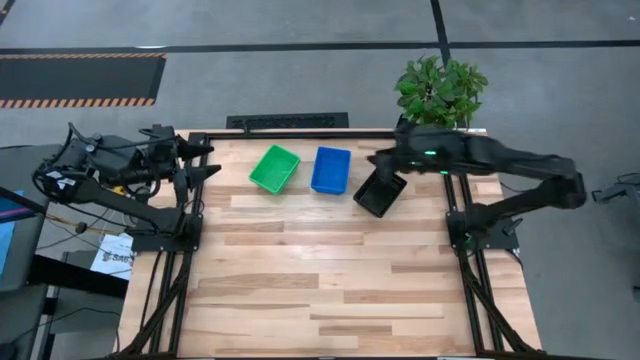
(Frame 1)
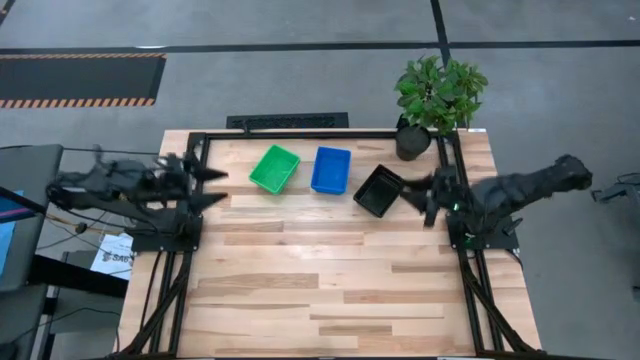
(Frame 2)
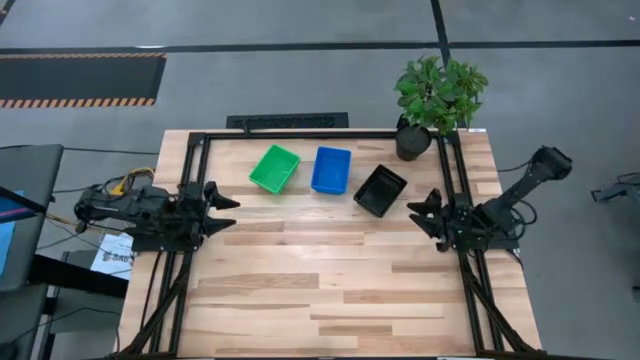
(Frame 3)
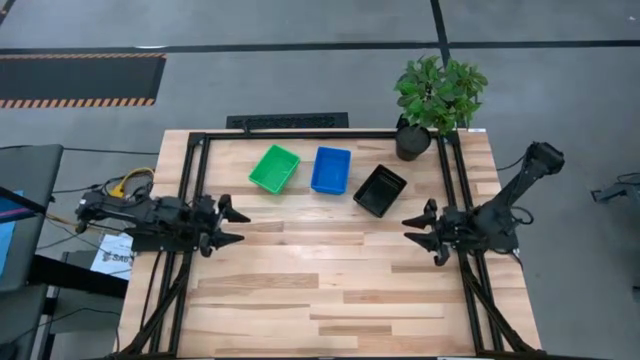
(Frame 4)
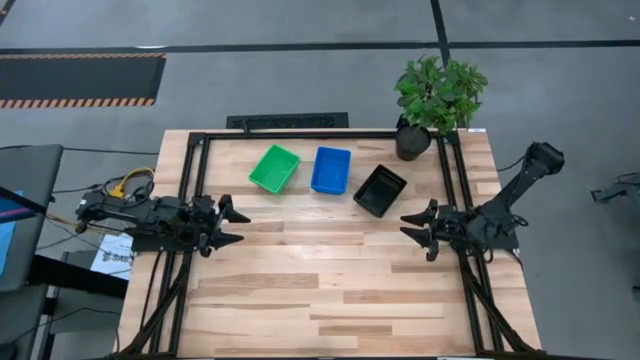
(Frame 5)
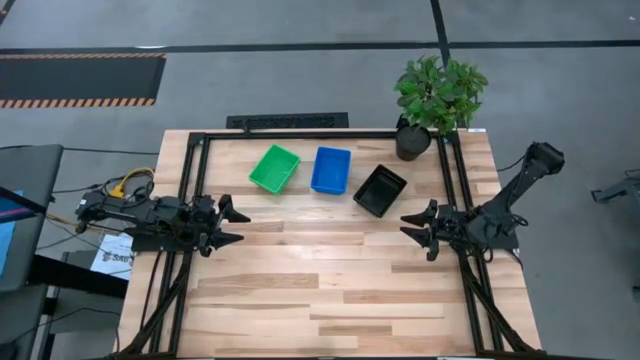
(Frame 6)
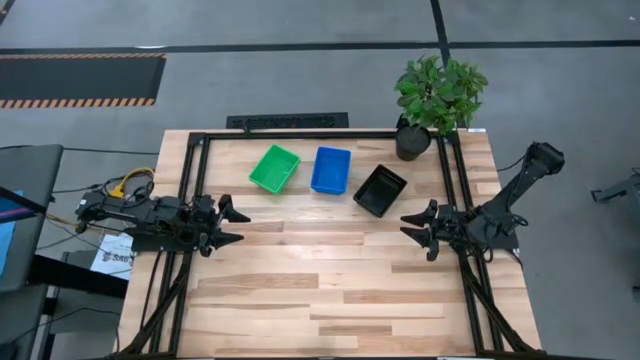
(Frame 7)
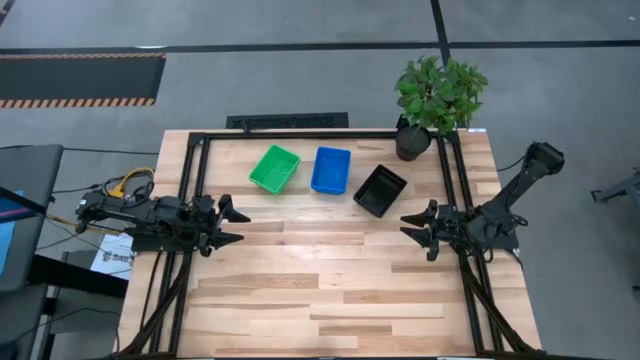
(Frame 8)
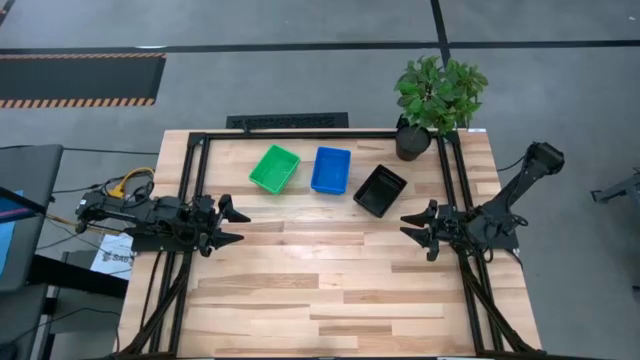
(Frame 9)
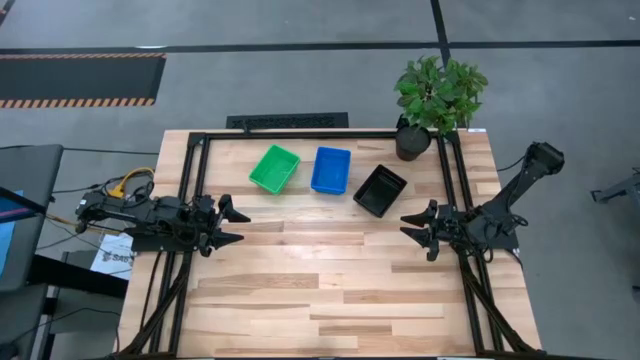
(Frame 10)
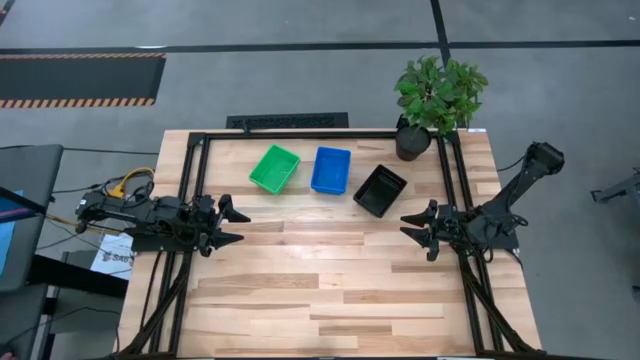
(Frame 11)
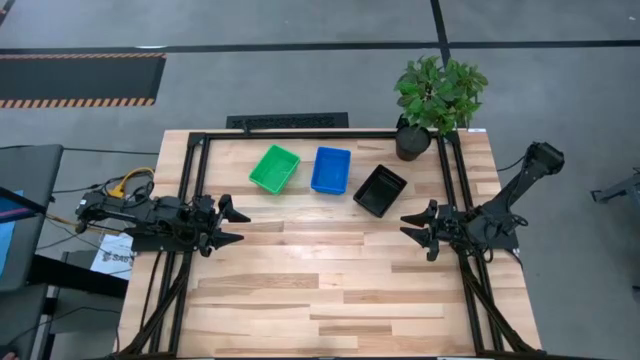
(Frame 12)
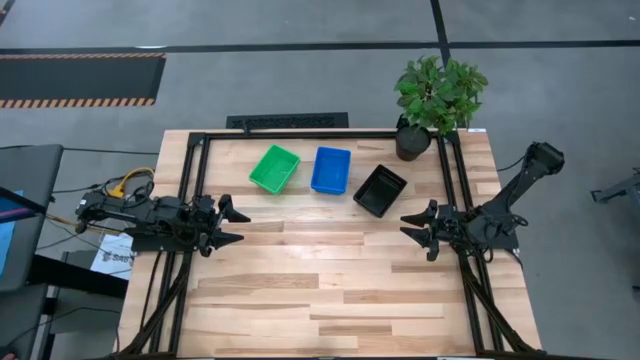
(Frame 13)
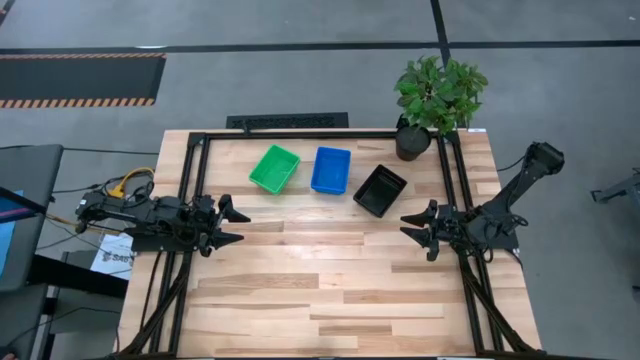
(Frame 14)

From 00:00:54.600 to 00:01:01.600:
Return to Home Position

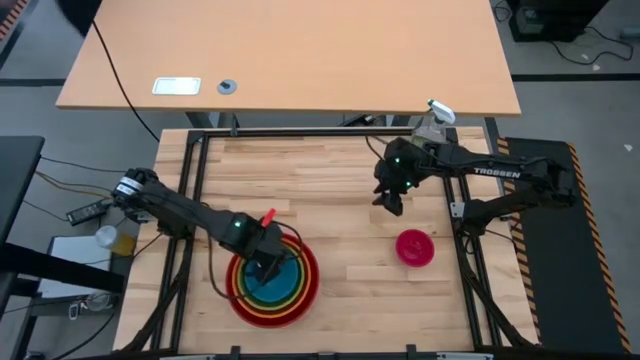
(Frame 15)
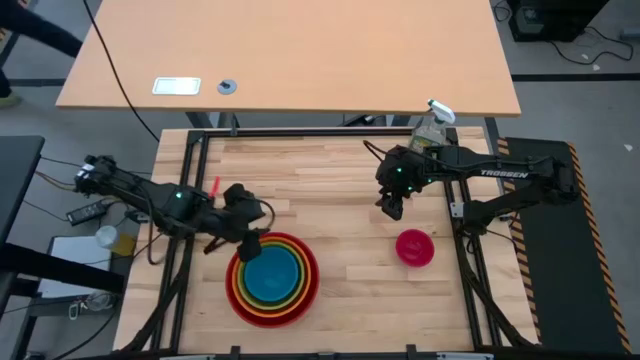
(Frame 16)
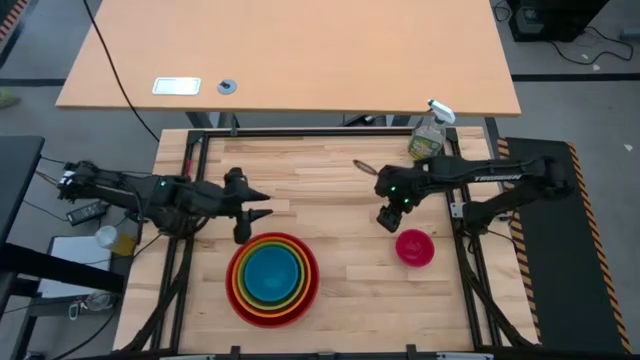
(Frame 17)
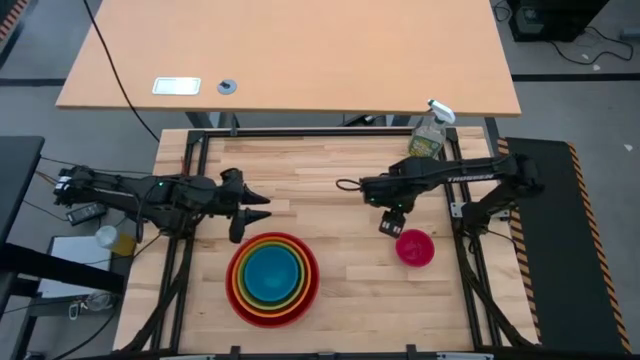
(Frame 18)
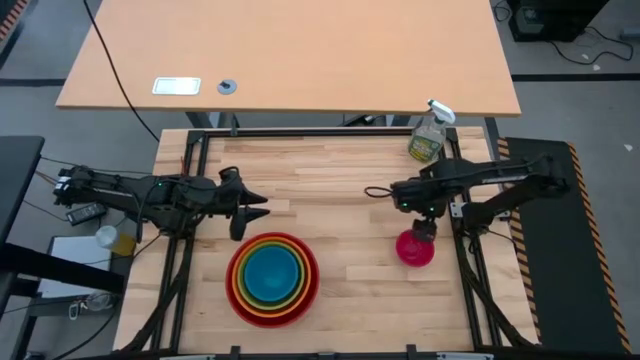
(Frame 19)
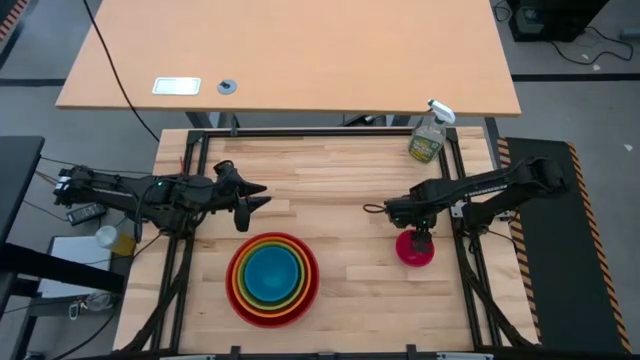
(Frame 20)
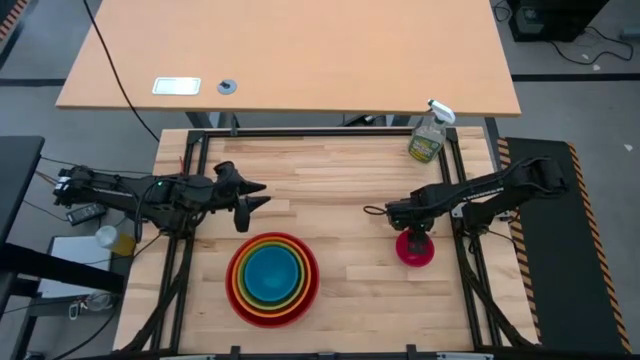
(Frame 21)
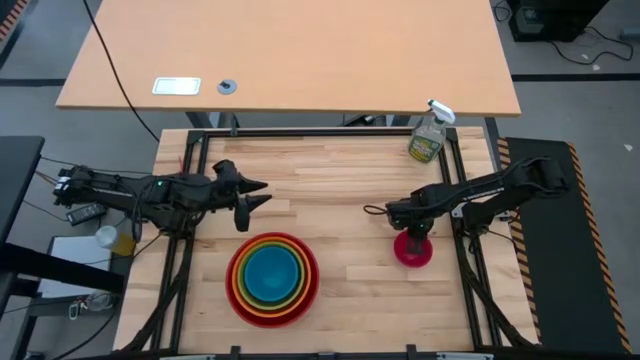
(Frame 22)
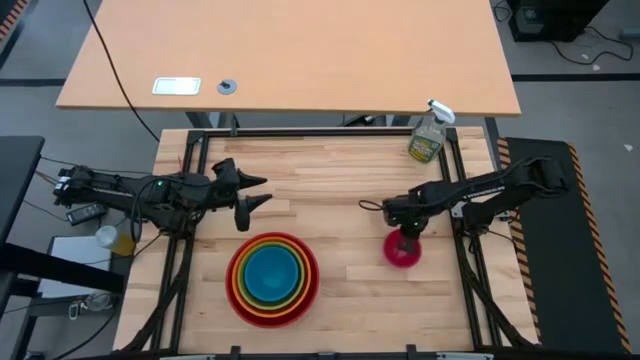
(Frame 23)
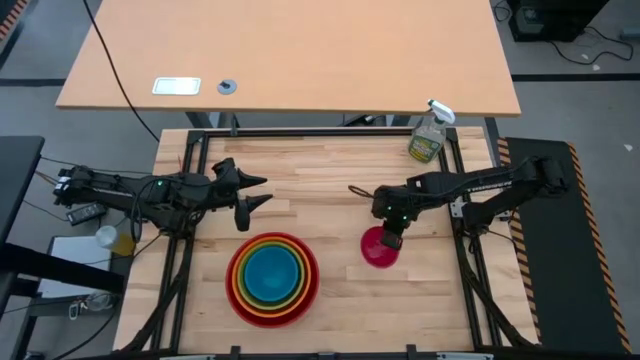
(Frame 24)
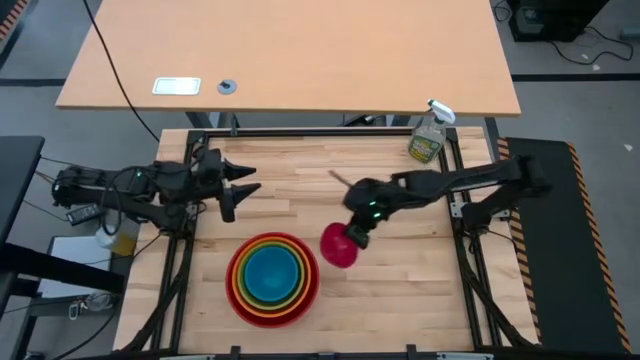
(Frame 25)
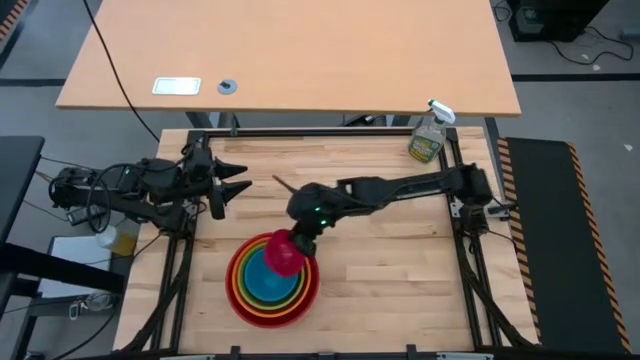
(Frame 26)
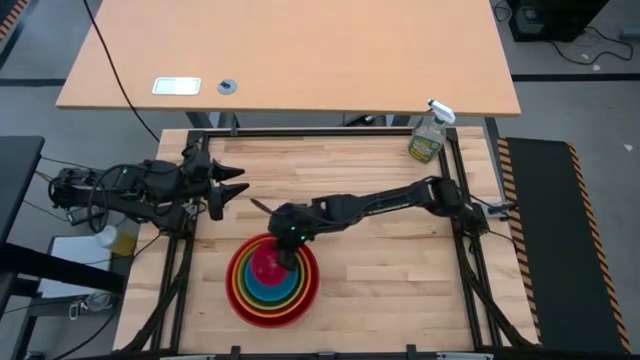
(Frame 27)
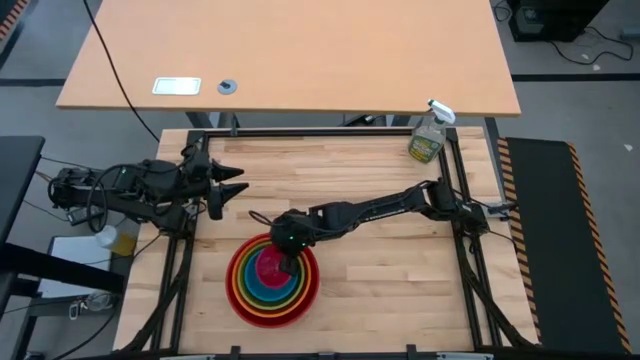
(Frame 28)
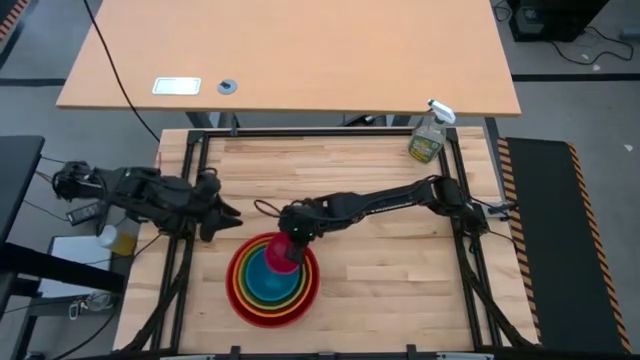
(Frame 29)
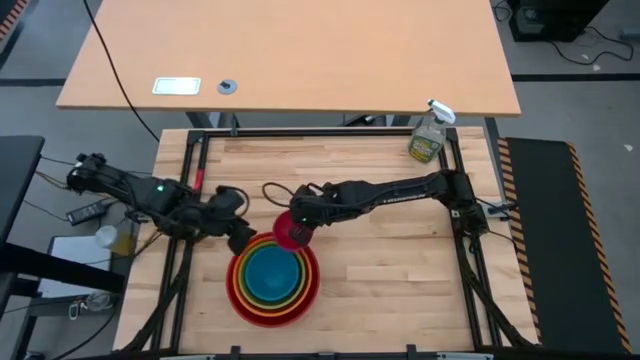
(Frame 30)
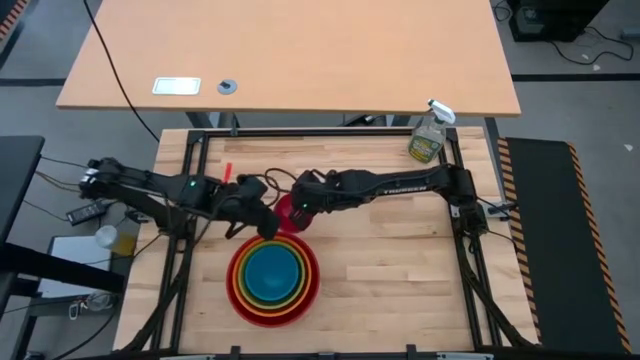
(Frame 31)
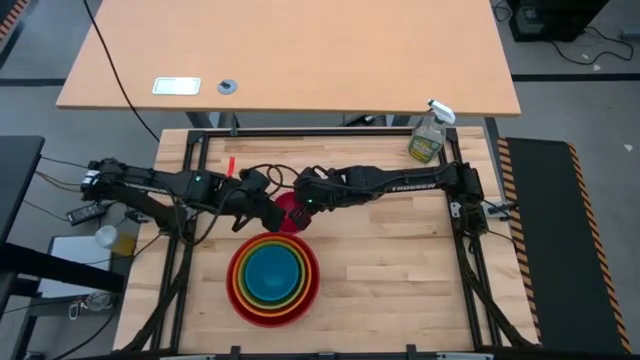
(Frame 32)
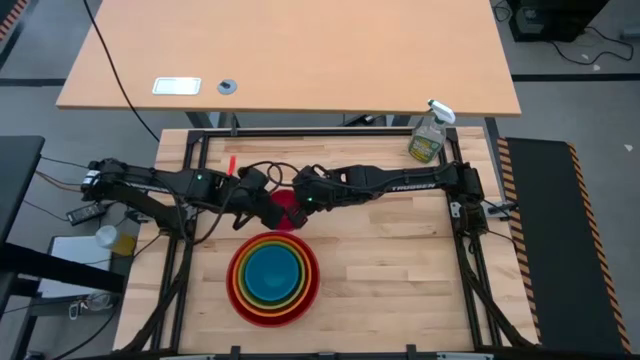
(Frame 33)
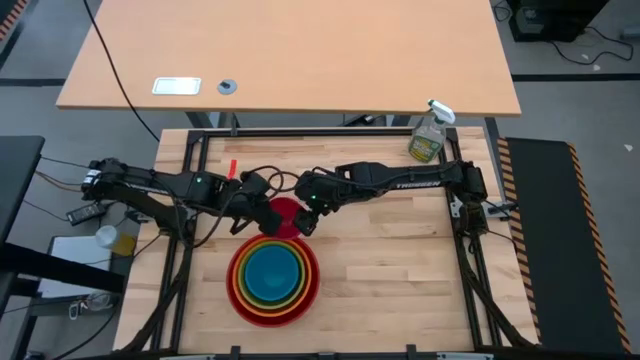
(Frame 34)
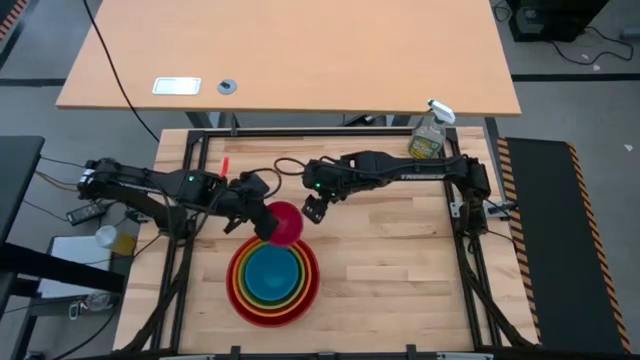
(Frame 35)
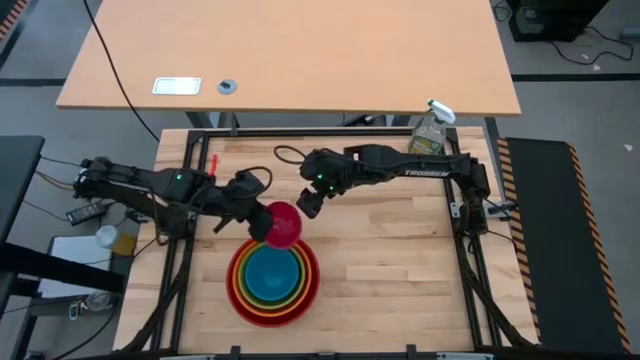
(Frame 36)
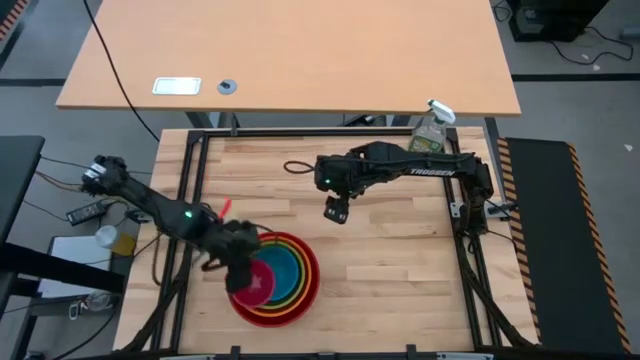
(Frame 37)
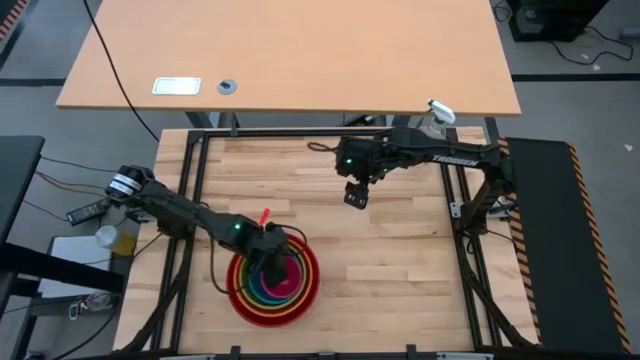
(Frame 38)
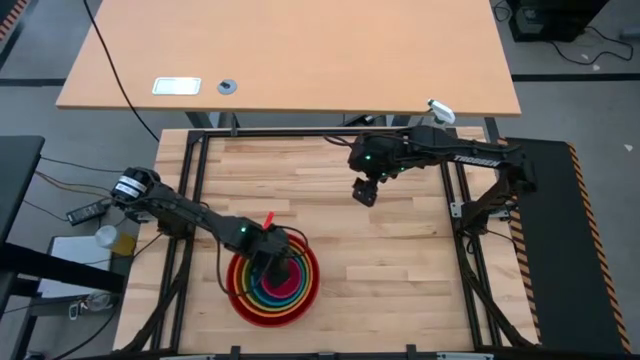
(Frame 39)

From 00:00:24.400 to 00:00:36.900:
Stack the red bowl on top of the blue bowl
